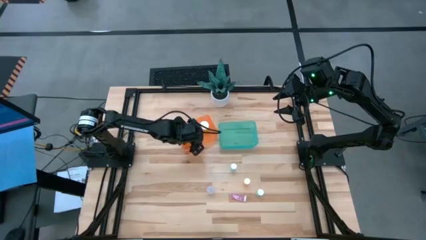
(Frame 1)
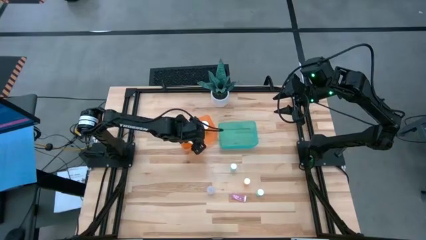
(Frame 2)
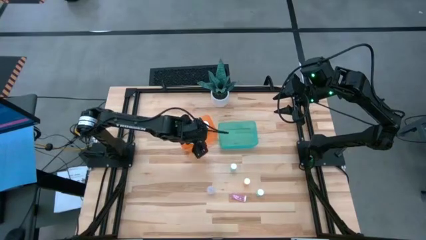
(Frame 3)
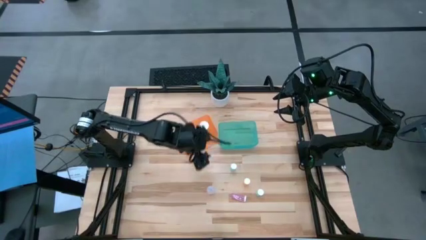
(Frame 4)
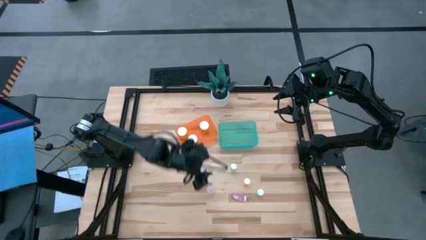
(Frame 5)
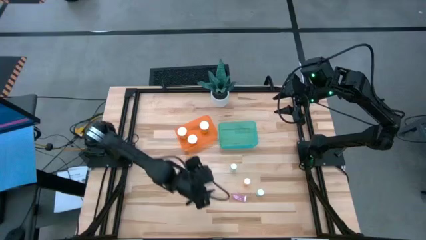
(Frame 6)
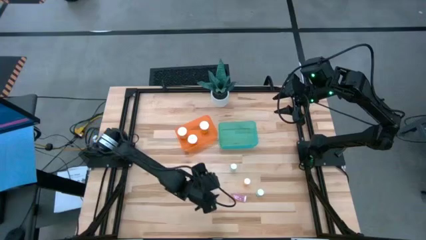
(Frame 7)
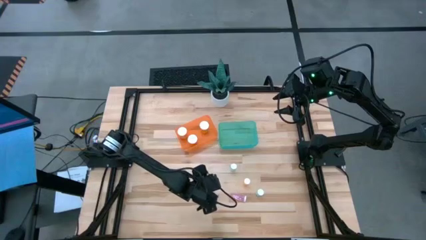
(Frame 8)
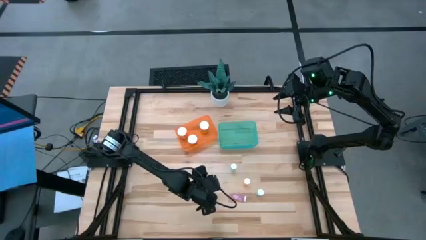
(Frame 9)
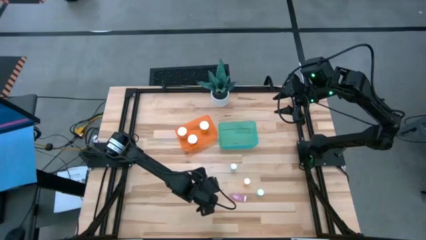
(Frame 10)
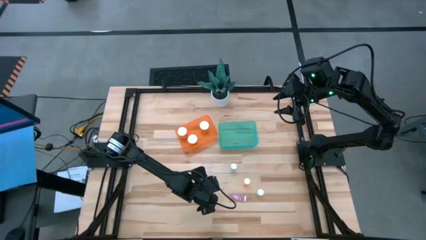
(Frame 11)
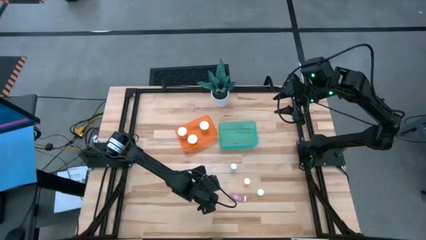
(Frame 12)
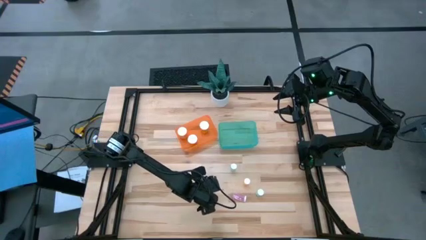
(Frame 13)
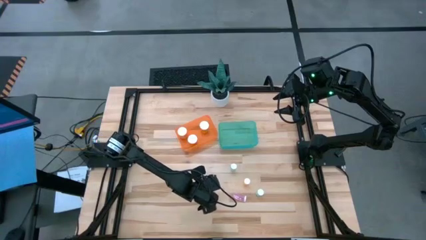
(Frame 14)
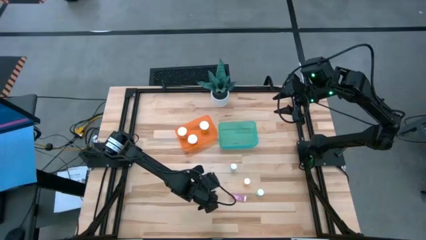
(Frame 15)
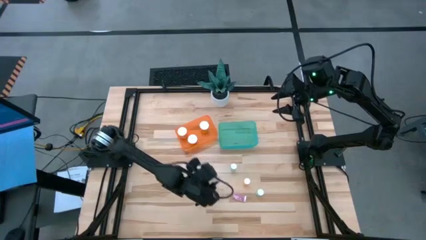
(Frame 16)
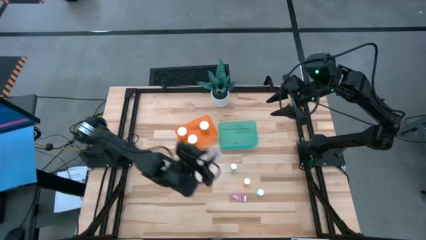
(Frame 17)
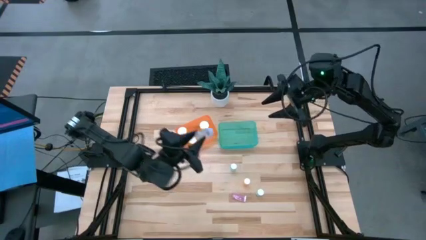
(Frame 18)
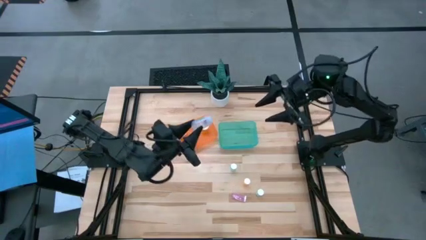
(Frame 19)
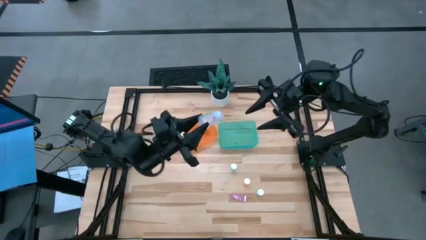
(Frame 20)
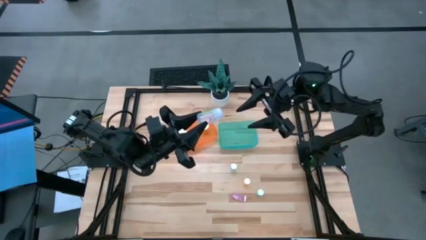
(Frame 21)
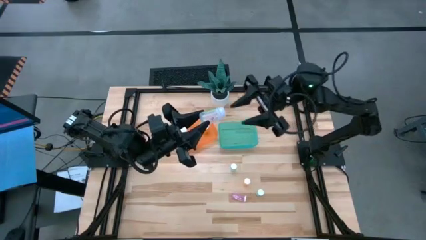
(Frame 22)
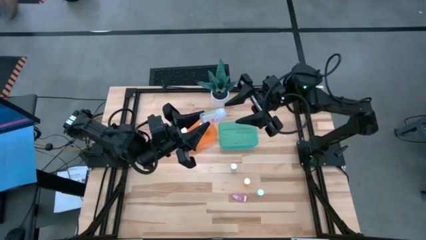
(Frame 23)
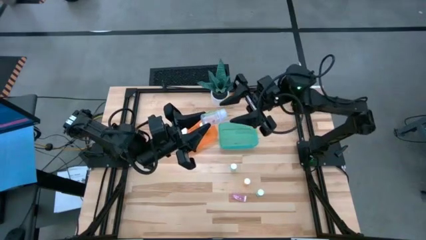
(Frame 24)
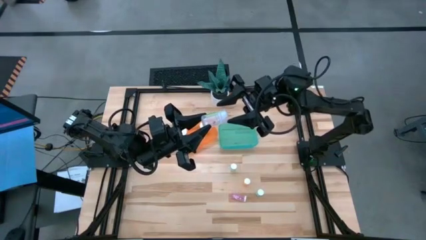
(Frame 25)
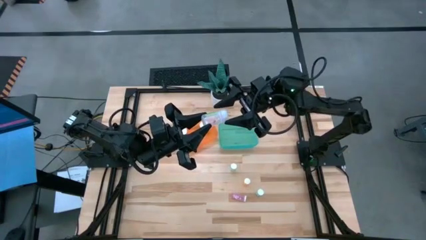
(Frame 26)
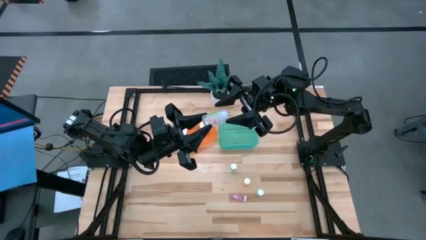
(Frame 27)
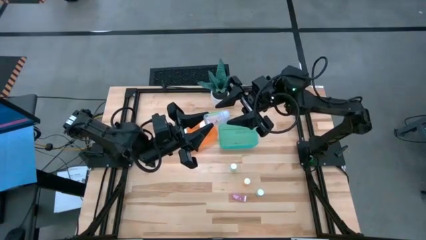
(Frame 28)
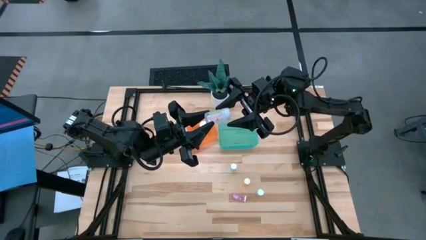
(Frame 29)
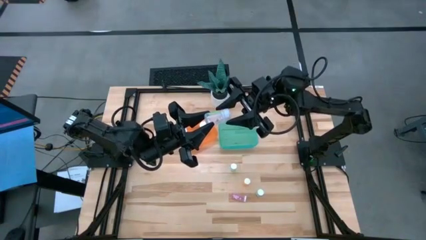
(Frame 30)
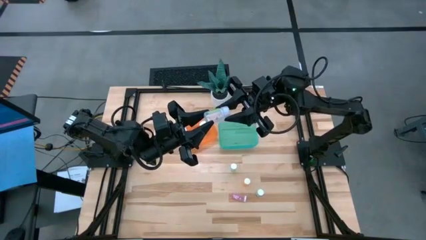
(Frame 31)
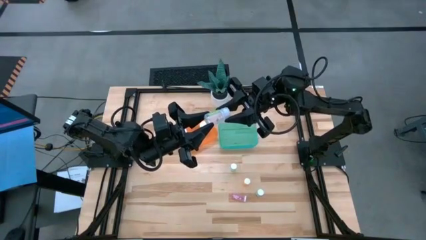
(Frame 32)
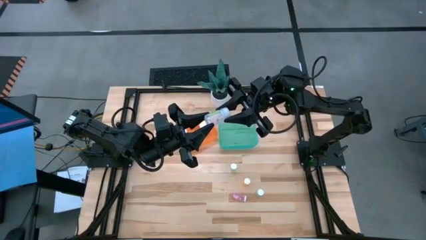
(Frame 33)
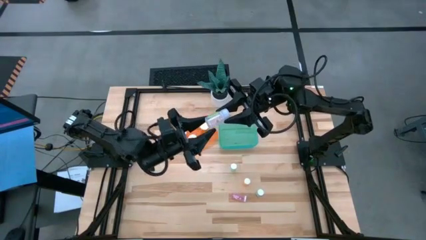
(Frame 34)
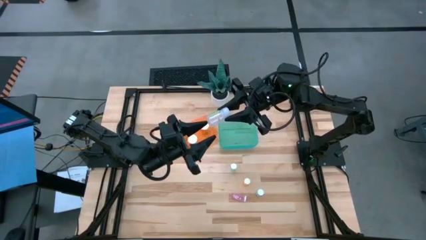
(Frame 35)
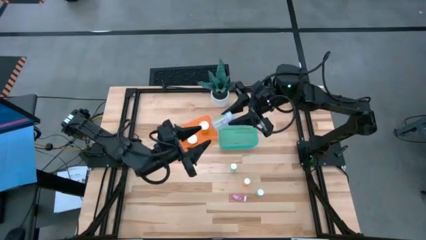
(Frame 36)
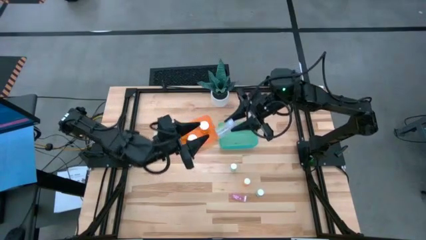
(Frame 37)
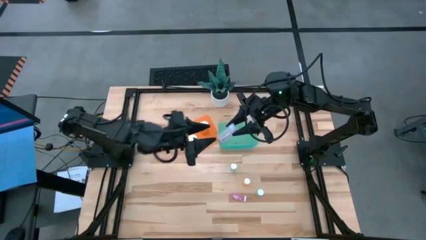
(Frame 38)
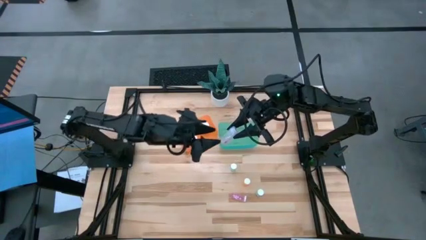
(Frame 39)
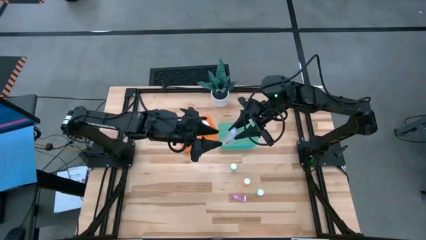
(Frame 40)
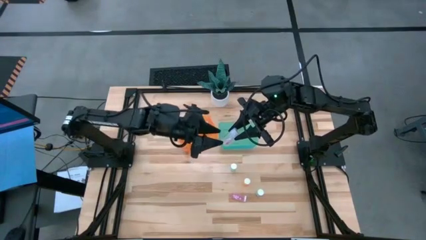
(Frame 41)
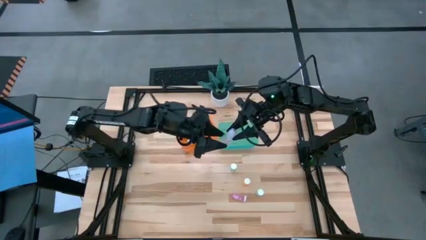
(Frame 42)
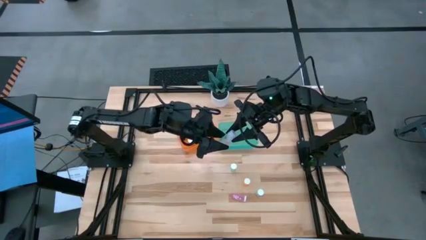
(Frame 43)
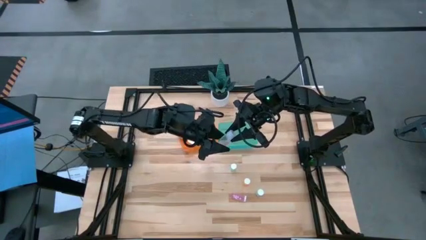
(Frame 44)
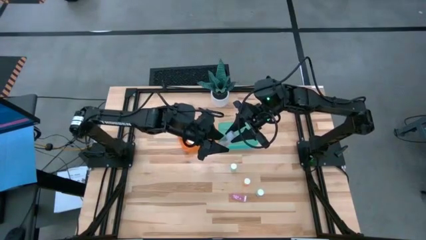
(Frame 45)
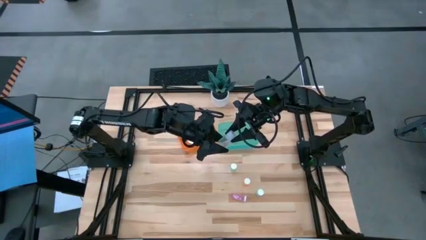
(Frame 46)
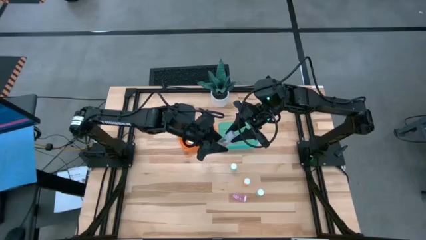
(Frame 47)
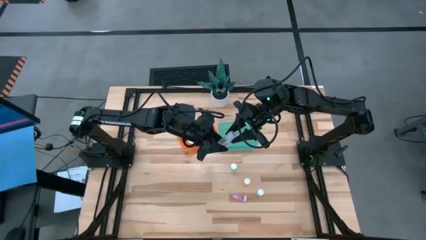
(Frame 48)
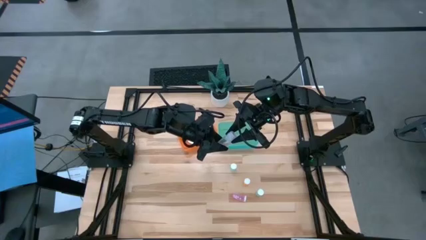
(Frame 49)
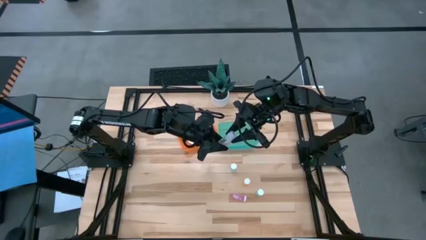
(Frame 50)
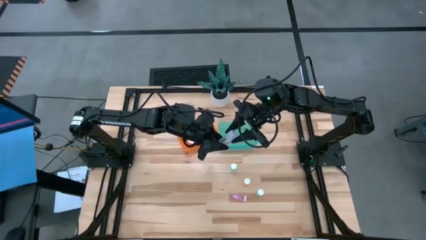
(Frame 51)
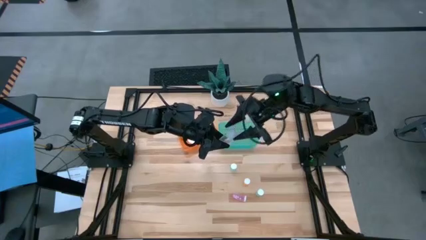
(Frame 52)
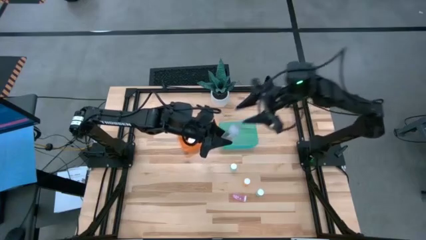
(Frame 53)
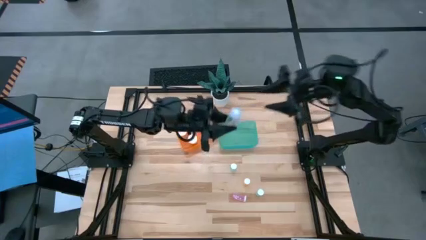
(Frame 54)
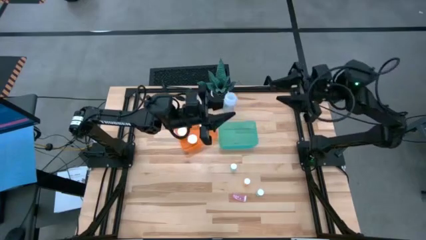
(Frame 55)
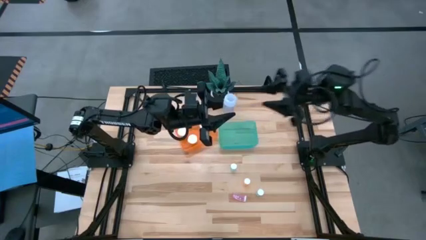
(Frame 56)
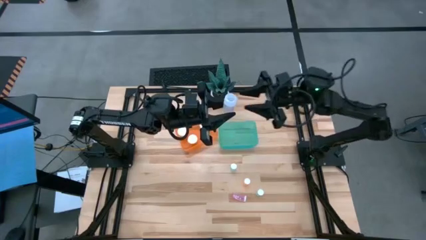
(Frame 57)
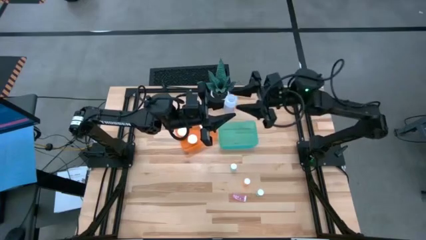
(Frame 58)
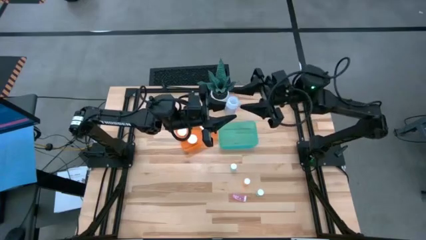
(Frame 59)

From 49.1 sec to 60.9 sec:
Task: Pick and place medicine bottles into bin by pill shape (circle, oval)
Put the transparent capsule bottle into the orange bin

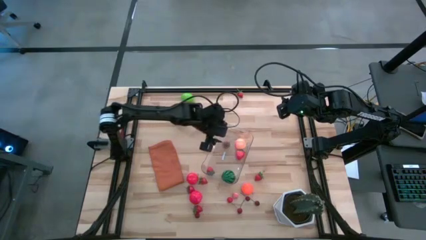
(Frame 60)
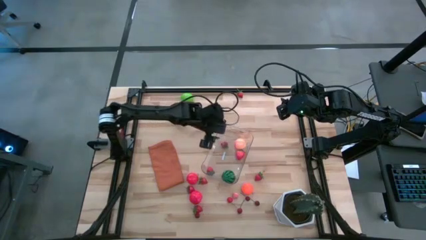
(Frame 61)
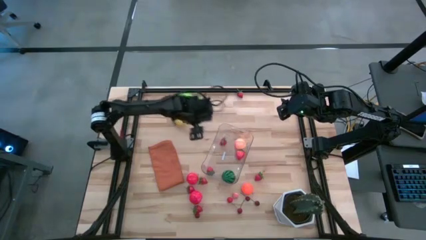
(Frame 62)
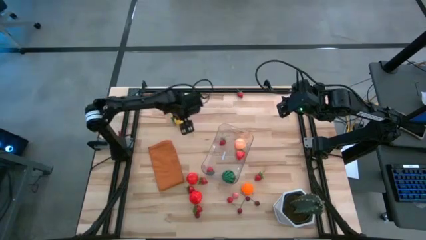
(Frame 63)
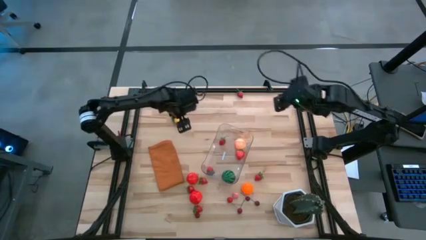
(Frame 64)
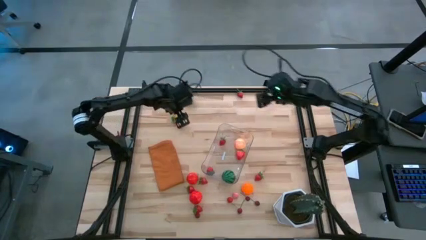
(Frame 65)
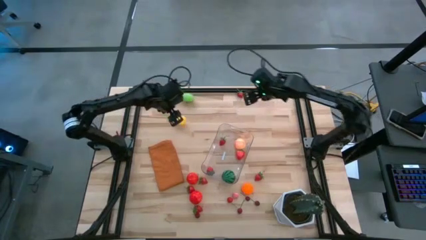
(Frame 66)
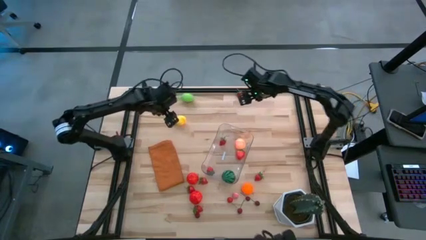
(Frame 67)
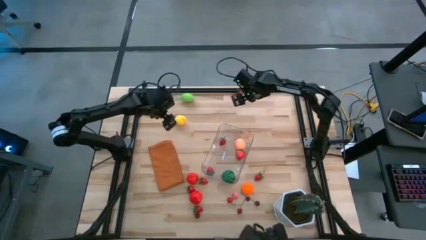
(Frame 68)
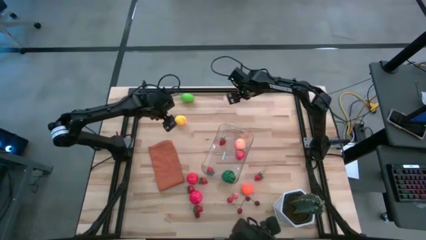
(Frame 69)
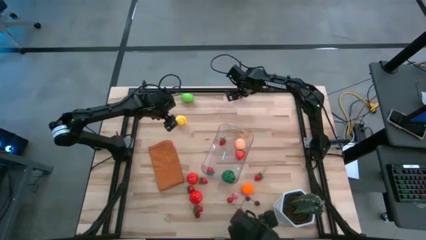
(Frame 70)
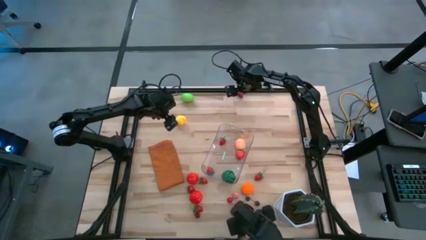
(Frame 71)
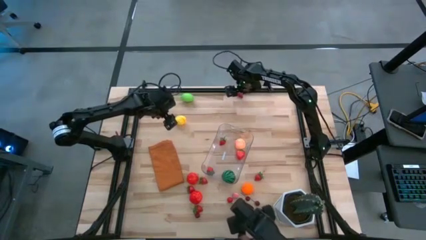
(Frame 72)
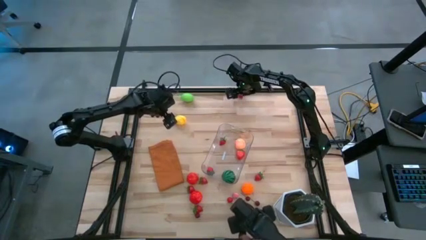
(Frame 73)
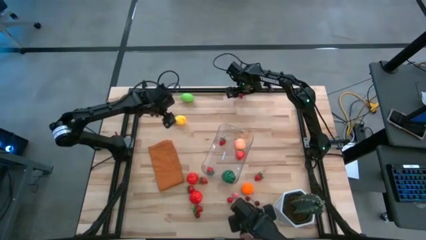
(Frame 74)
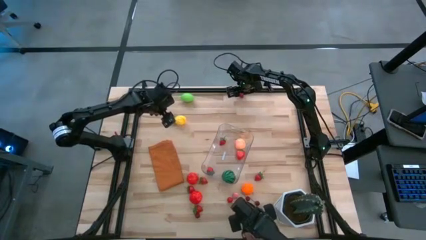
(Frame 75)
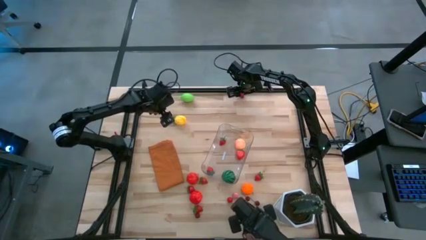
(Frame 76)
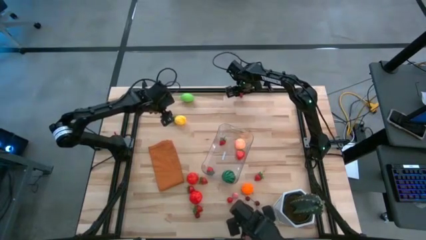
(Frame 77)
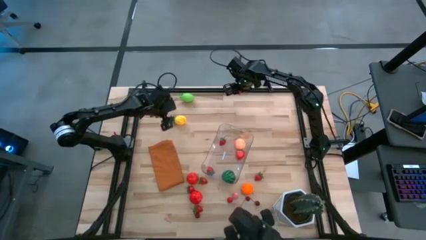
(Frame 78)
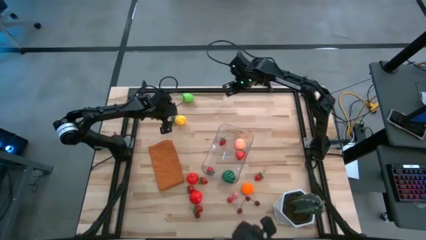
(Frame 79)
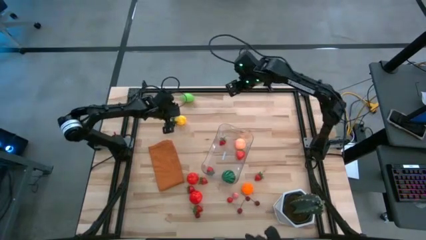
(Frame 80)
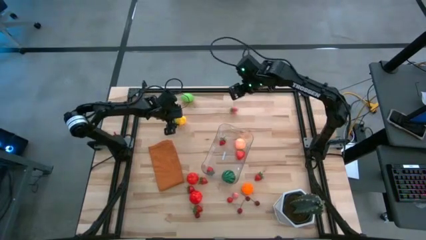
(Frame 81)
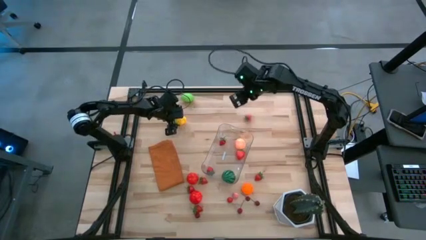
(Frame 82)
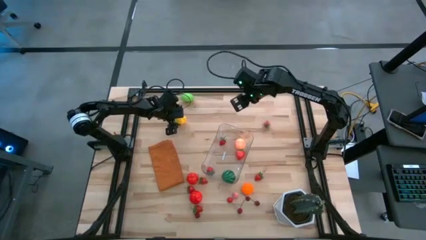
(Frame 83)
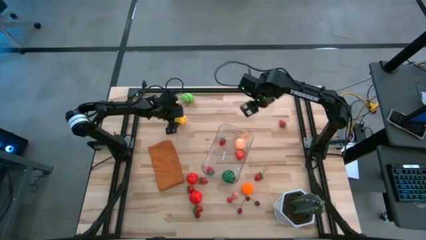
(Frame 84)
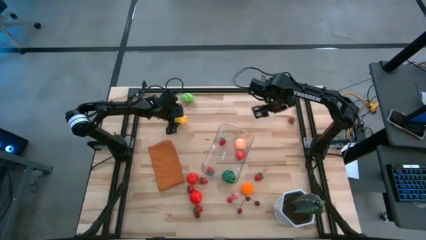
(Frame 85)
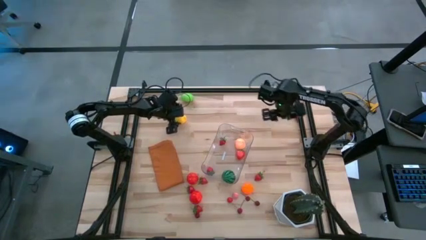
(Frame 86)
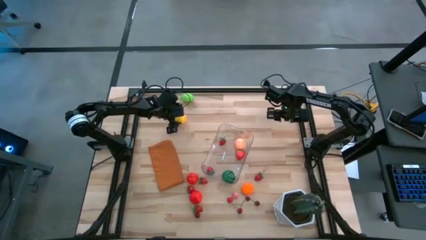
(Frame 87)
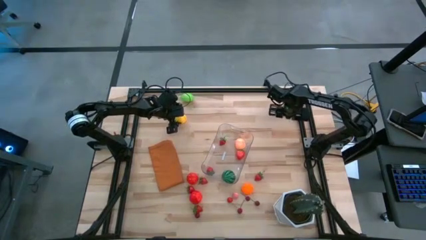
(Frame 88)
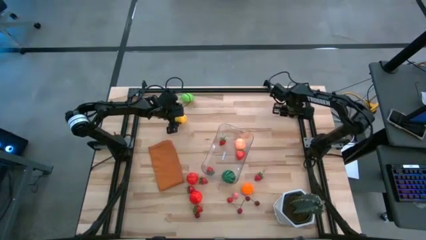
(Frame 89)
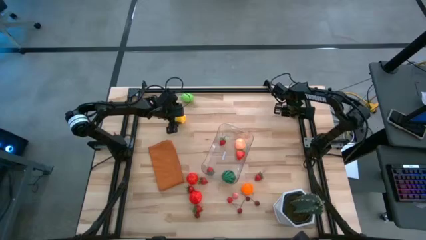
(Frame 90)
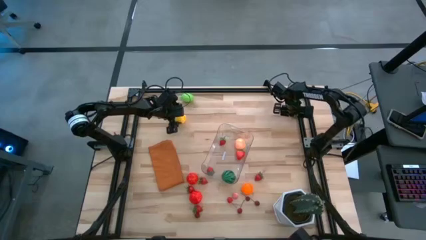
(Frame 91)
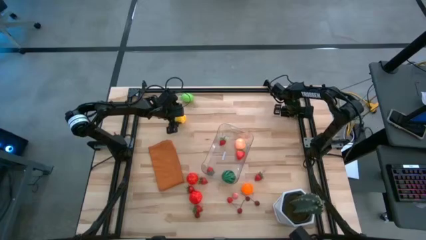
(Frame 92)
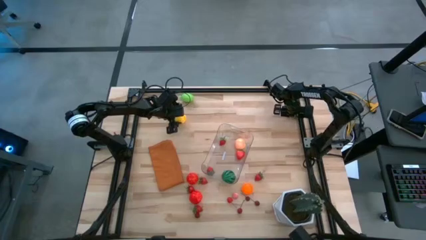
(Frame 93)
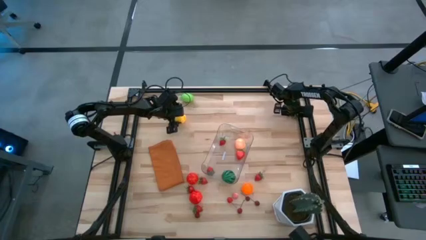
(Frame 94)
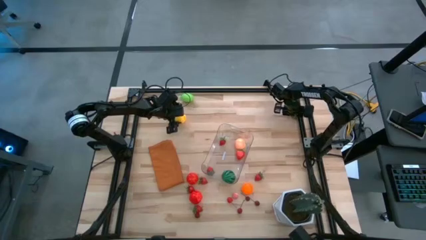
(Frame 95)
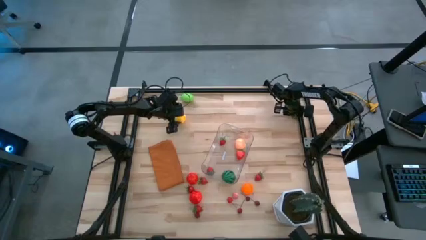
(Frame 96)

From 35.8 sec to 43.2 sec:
Task: Pick and placing Produce into tupperware
Put the red strawberry into the transparent bin
